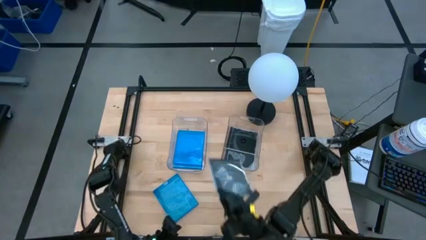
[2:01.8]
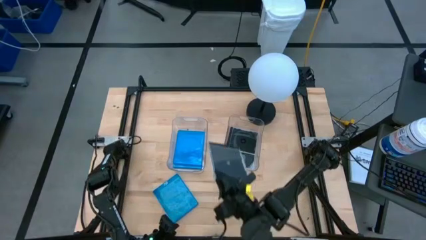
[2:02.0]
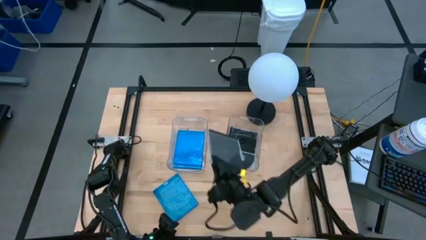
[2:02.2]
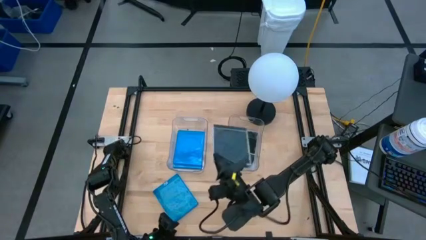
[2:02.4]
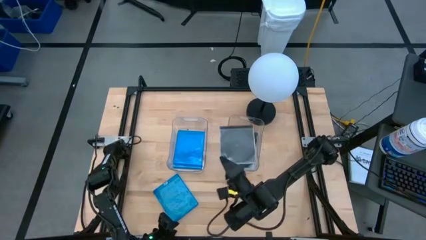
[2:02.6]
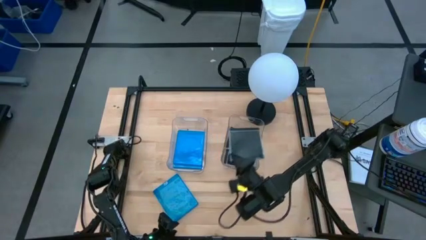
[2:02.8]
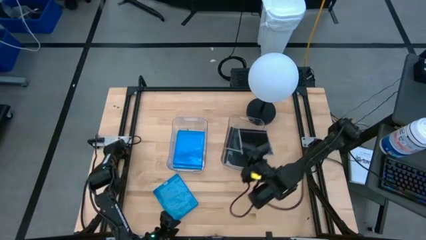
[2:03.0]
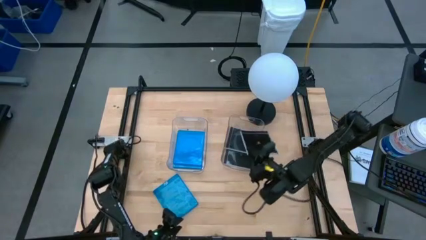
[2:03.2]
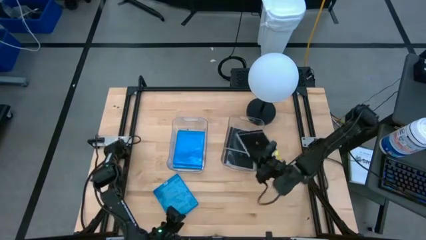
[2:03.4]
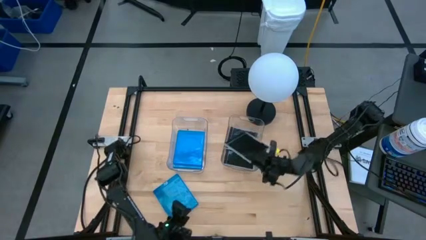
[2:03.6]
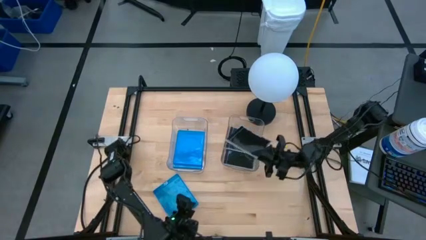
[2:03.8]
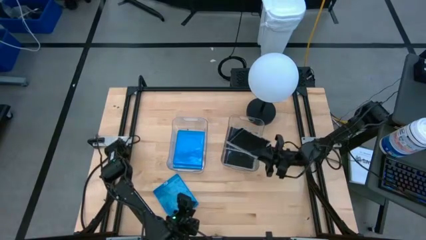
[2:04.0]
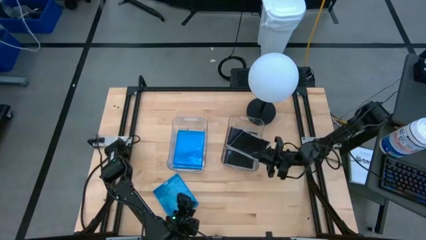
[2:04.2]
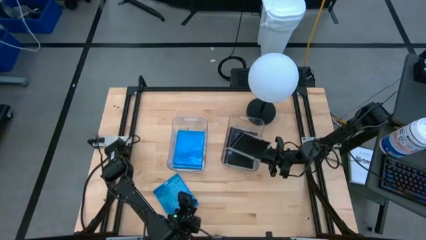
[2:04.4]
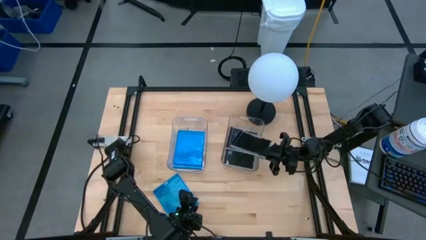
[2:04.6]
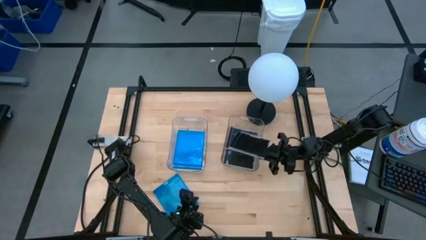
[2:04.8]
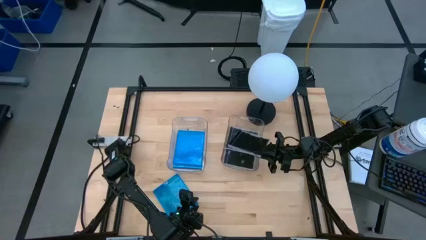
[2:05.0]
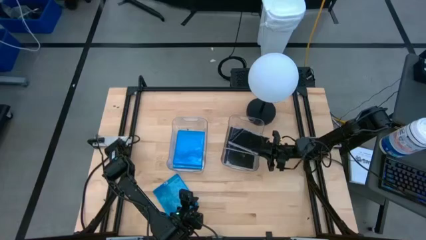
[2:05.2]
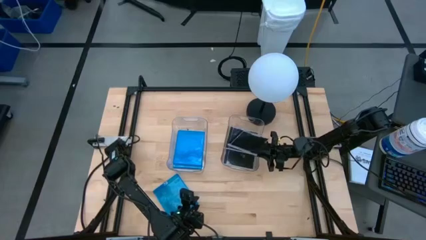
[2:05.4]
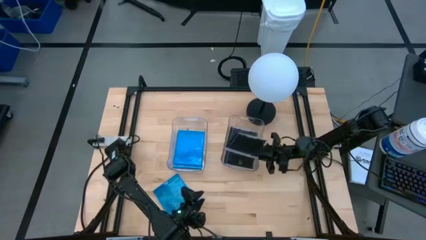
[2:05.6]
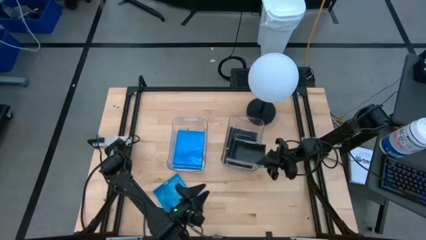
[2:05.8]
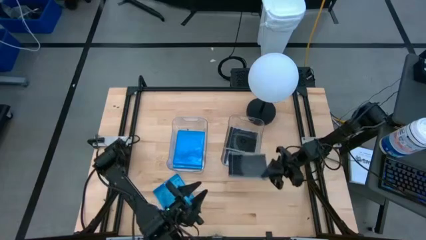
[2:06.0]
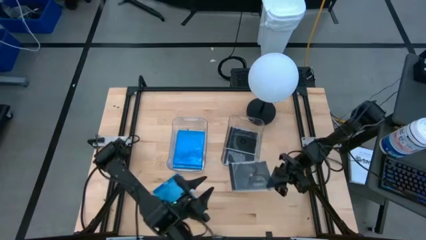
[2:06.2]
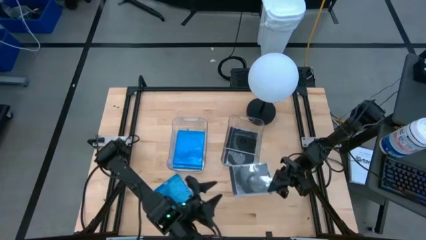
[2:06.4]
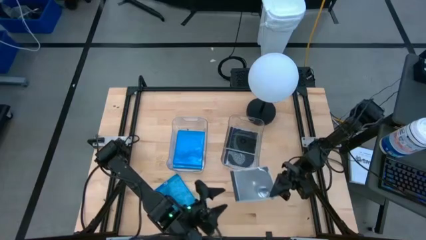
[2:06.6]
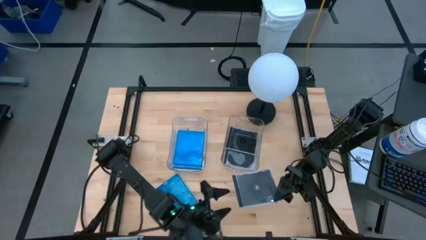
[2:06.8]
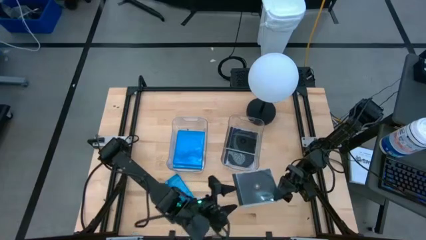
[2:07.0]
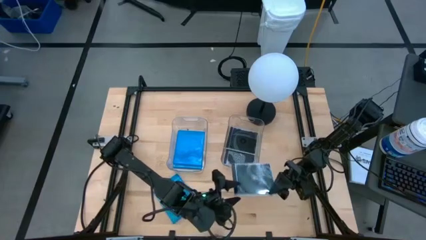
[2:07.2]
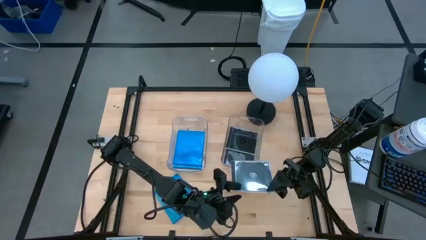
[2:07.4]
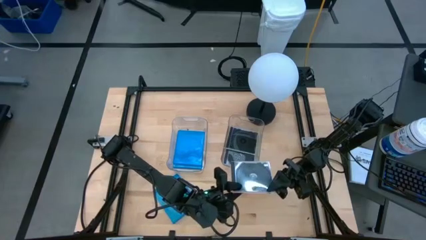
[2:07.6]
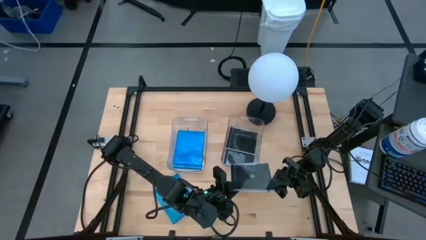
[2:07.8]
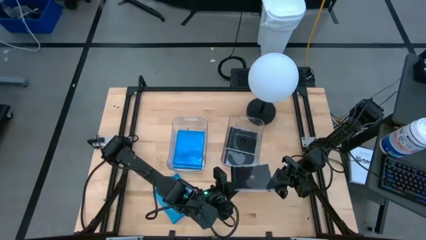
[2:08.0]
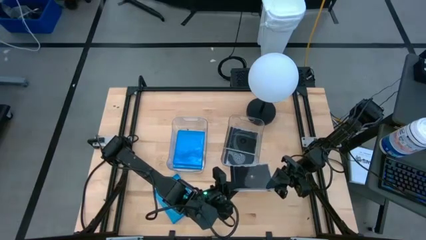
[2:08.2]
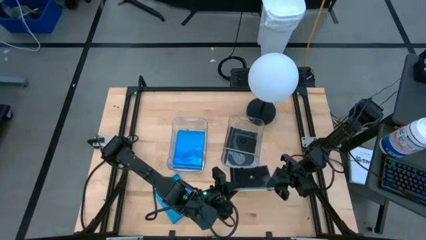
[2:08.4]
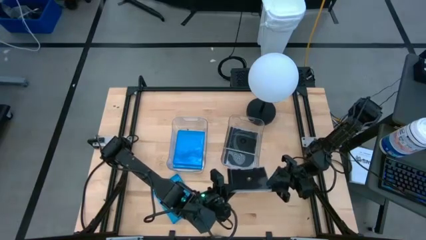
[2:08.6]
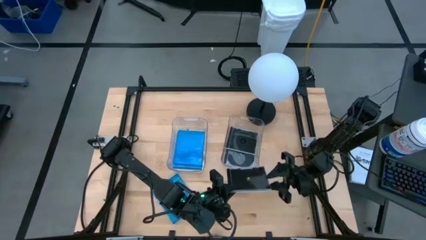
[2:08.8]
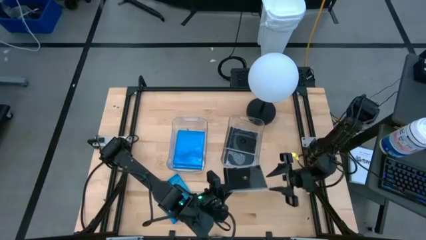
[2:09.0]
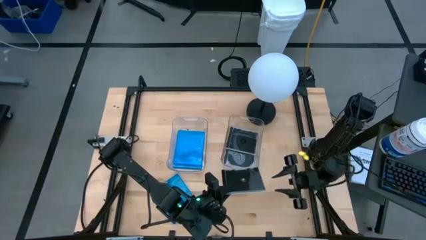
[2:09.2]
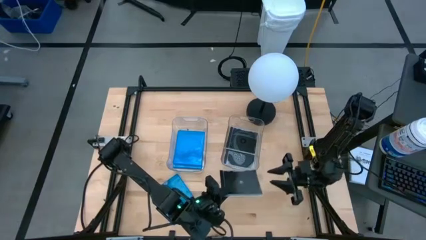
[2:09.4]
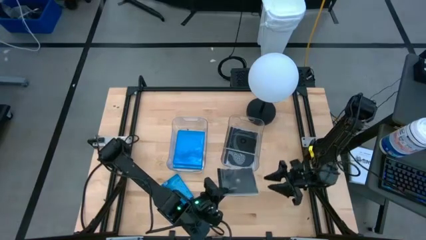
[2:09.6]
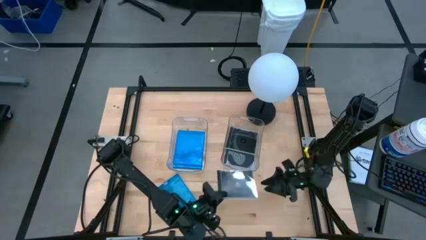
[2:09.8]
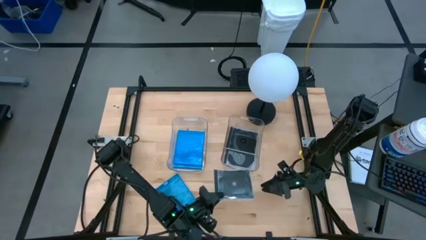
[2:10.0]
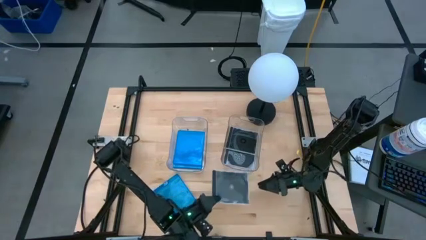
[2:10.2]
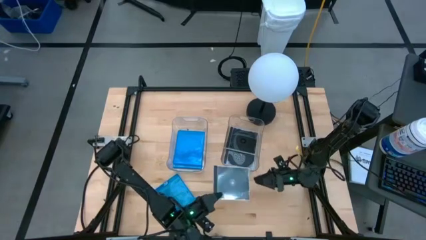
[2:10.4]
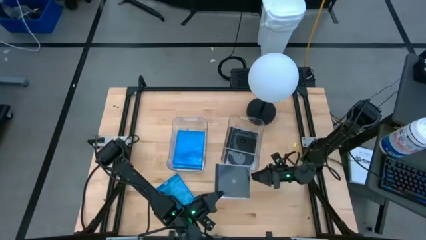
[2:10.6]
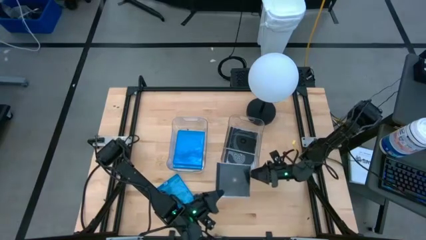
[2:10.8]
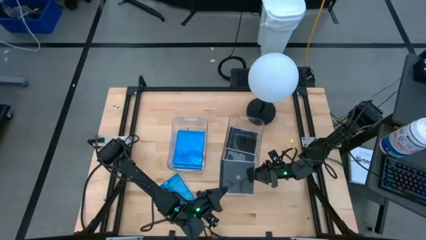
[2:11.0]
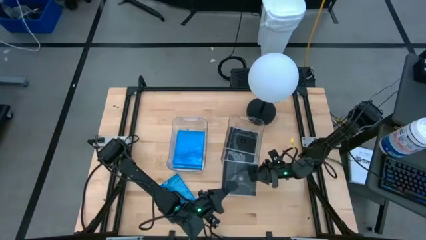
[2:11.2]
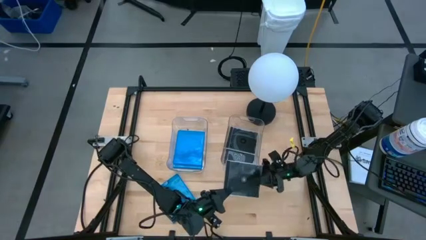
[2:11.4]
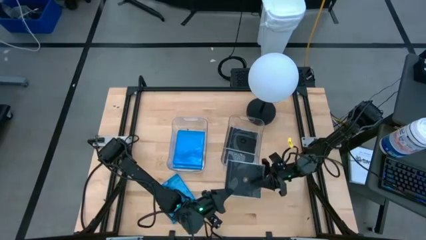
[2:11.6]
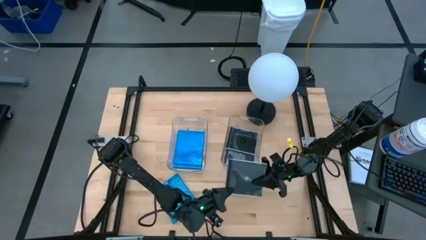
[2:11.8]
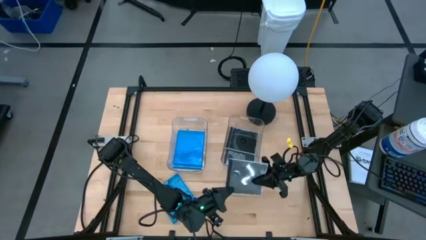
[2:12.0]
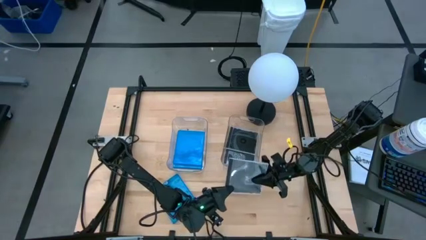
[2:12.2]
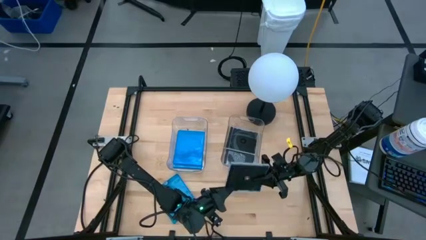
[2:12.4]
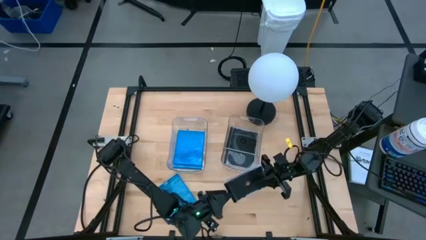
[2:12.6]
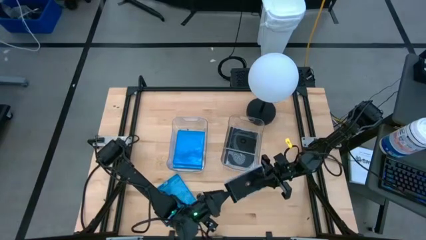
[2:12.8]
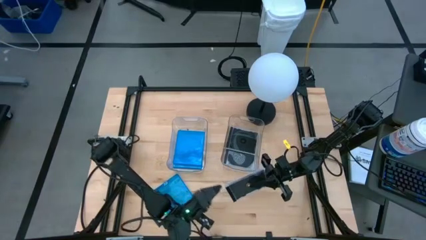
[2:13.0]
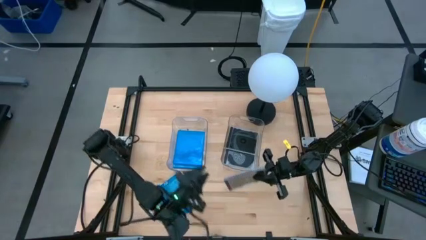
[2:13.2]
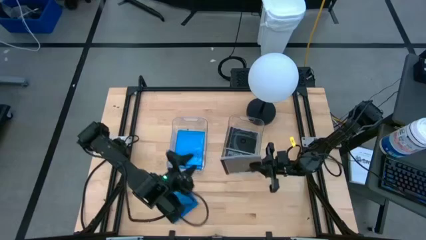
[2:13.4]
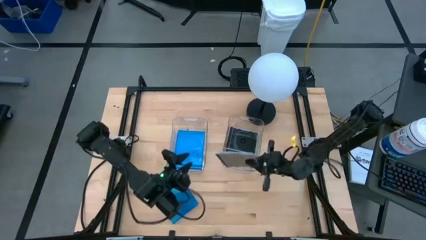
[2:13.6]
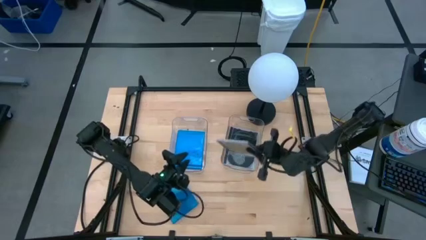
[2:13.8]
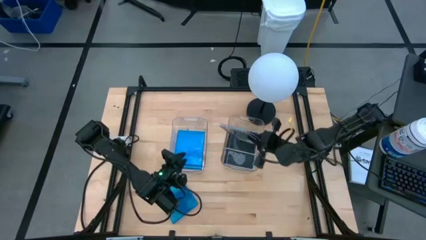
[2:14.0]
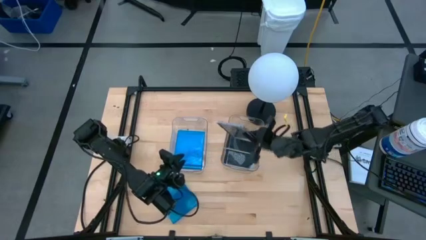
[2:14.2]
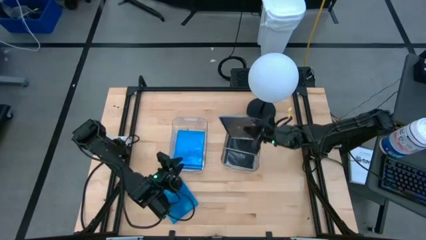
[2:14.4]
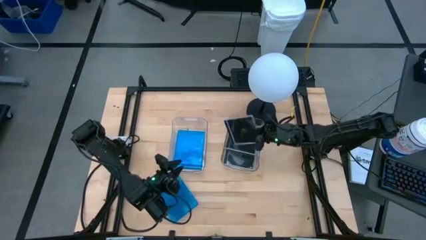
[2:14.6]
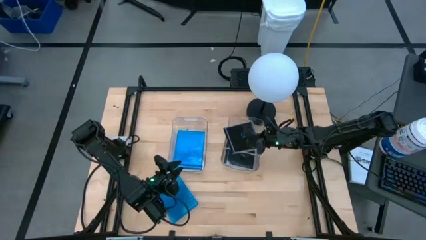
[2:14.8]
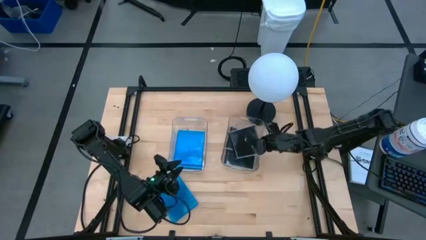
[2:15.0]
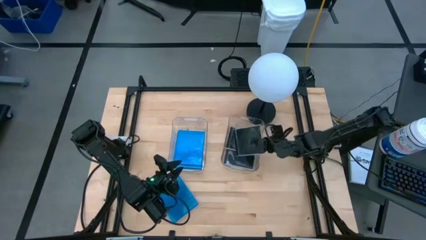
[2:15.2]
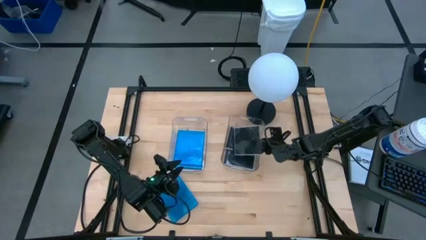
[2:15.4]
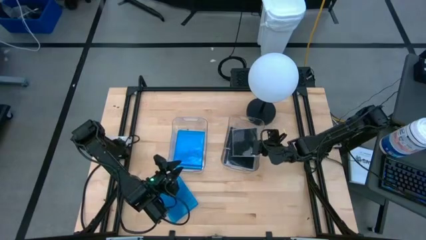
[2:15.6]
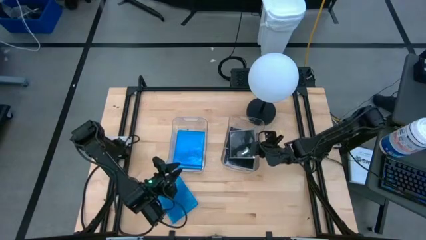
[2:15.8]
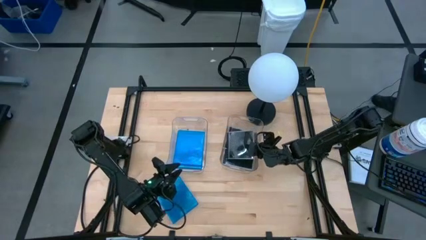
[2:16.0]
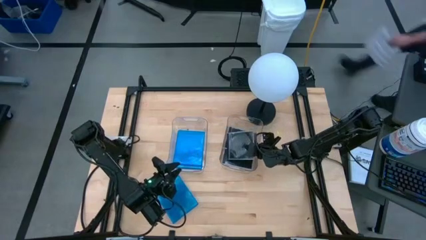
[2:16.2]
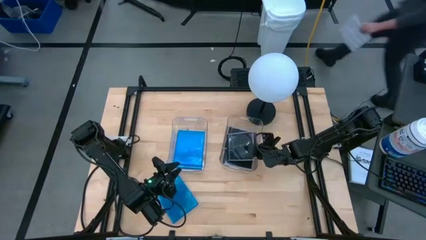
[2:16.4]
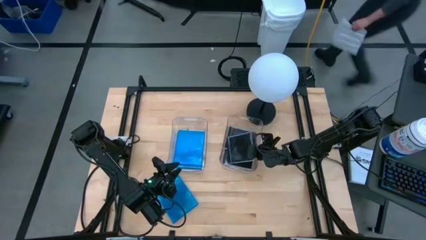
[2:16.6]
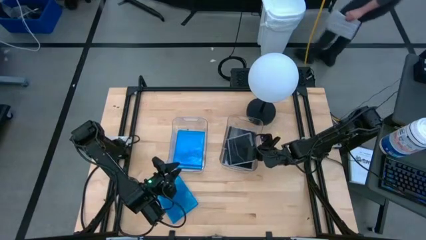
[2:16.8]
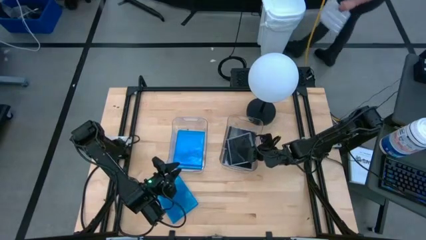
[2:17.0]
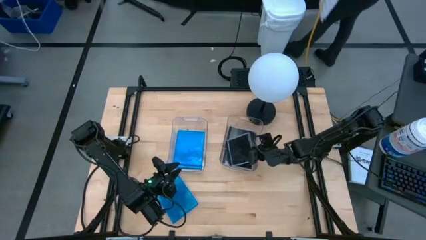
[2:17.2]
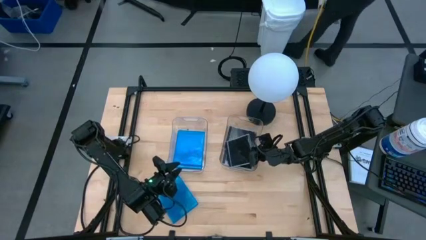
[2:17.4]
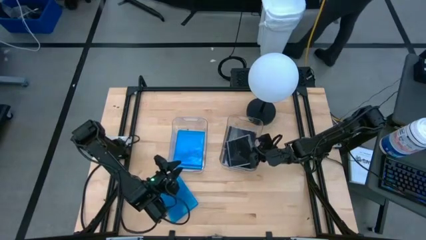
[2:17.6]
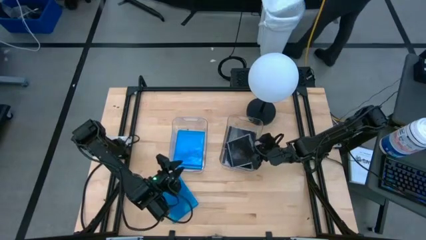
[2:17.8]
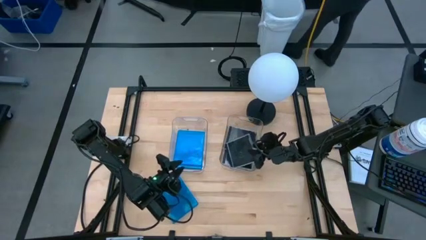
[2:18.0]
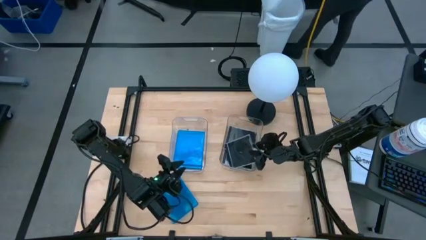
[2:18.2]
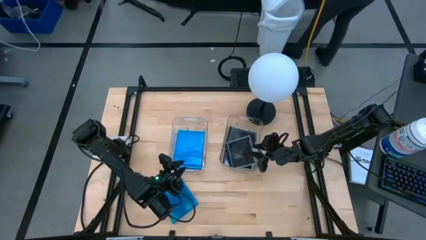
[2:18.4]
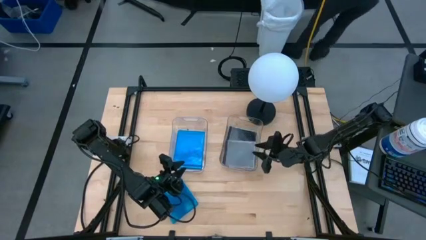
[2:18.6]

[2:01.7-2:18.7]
Task: Pick & place jewel cases by type
Put the black CD case into the right transparent bin
